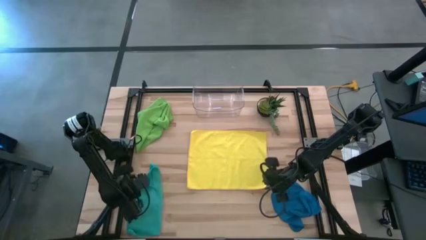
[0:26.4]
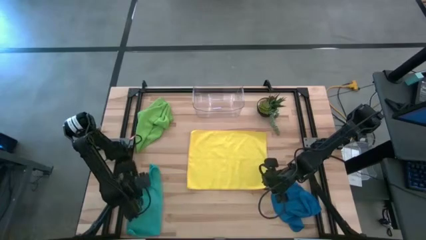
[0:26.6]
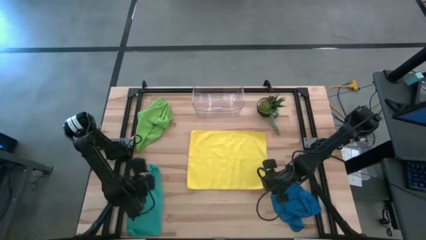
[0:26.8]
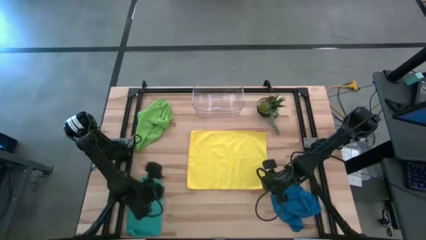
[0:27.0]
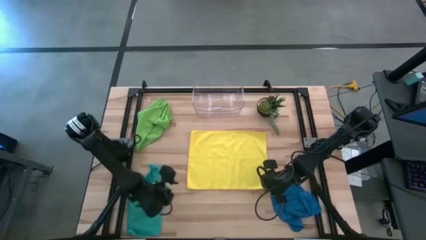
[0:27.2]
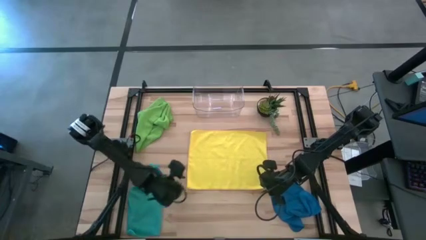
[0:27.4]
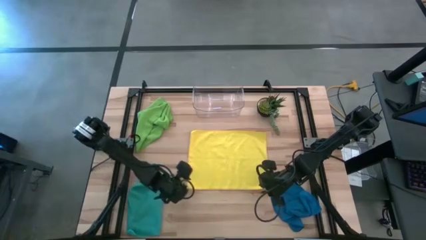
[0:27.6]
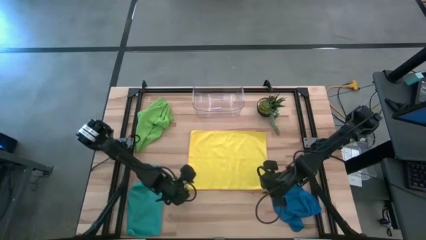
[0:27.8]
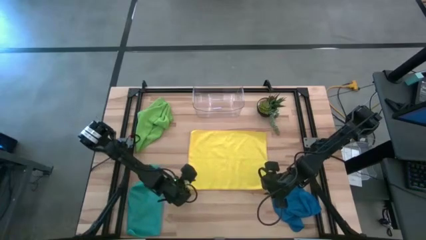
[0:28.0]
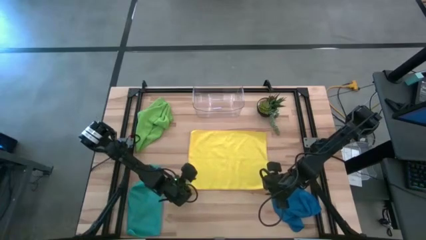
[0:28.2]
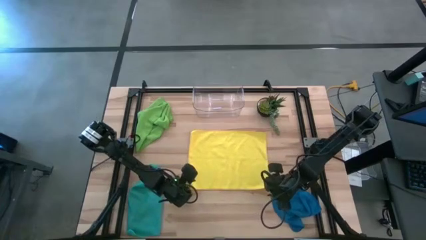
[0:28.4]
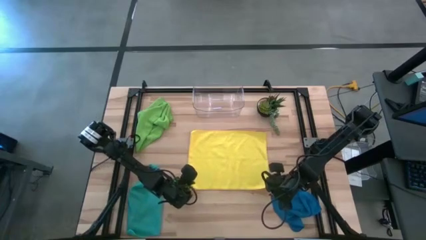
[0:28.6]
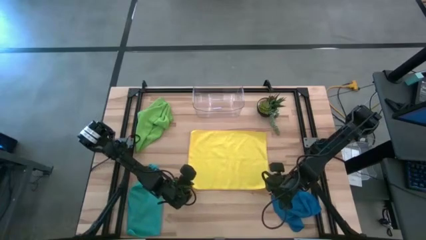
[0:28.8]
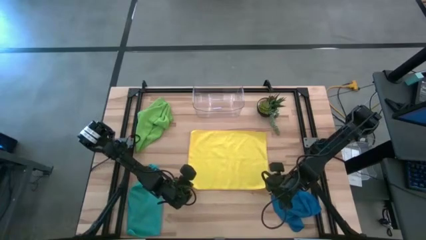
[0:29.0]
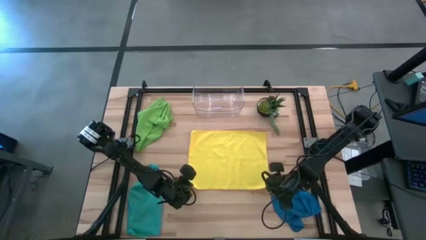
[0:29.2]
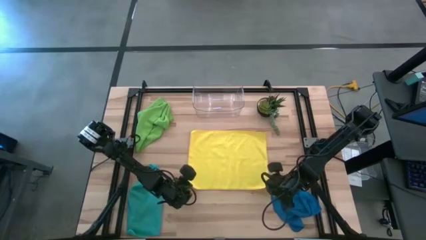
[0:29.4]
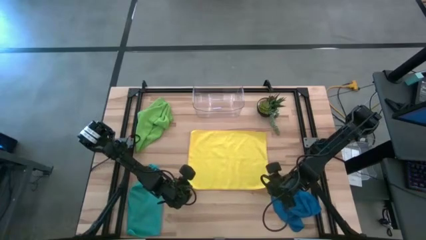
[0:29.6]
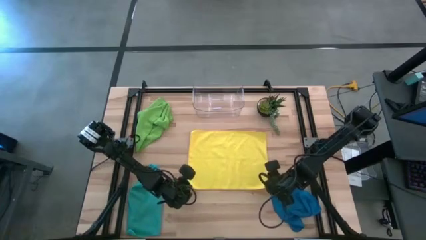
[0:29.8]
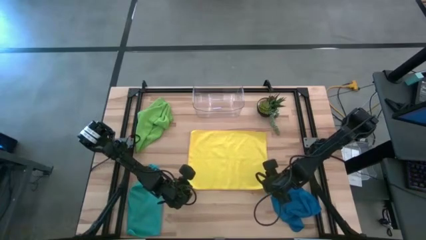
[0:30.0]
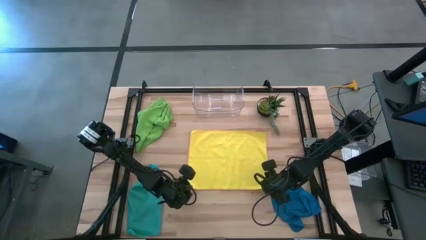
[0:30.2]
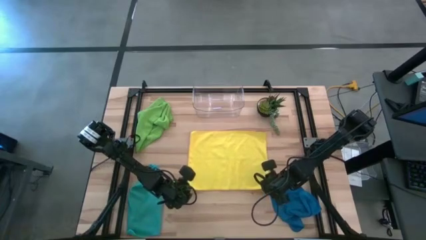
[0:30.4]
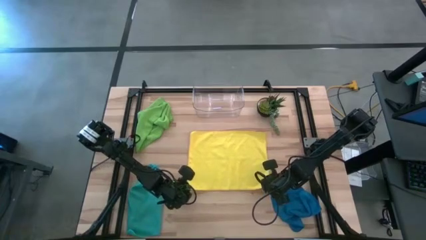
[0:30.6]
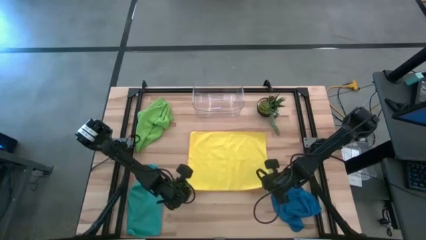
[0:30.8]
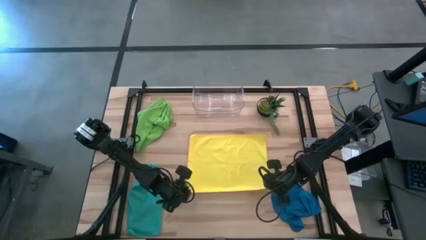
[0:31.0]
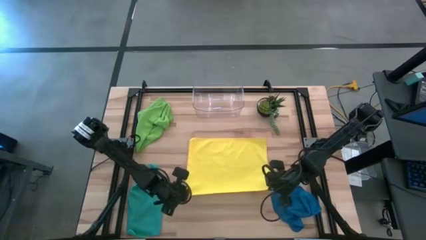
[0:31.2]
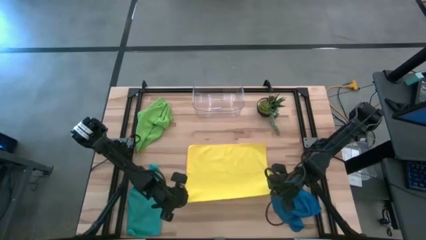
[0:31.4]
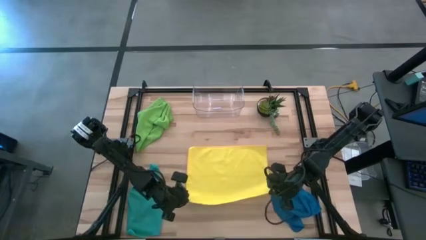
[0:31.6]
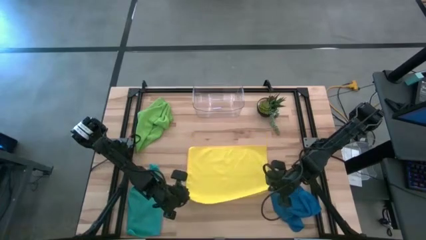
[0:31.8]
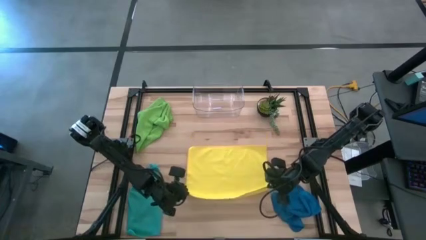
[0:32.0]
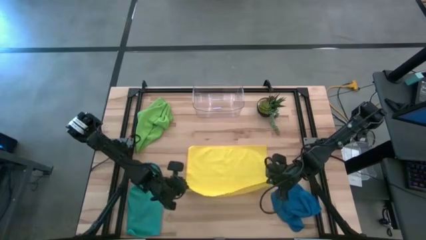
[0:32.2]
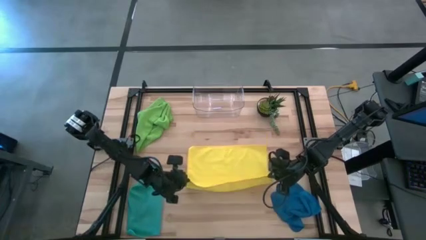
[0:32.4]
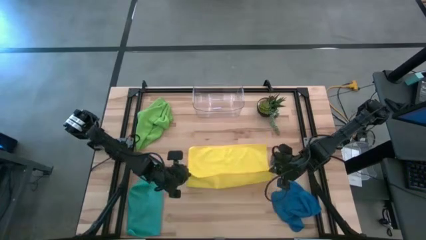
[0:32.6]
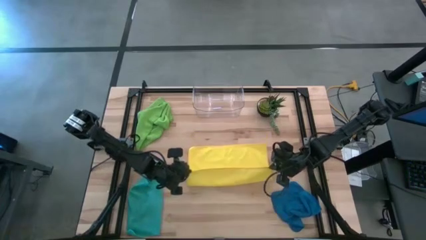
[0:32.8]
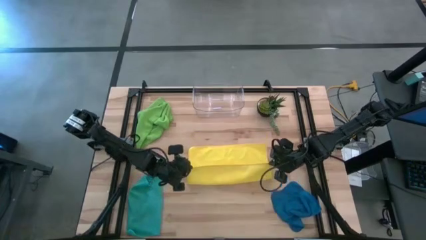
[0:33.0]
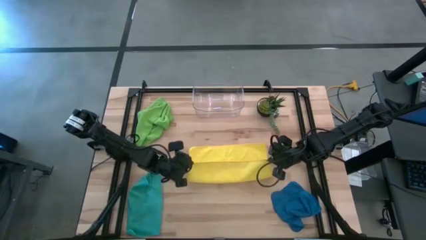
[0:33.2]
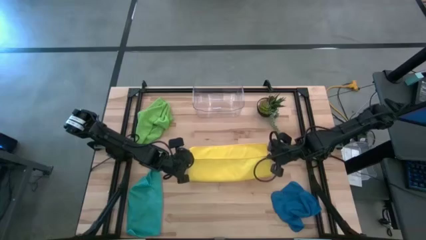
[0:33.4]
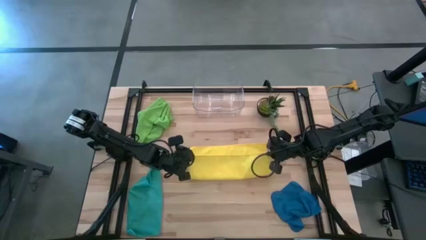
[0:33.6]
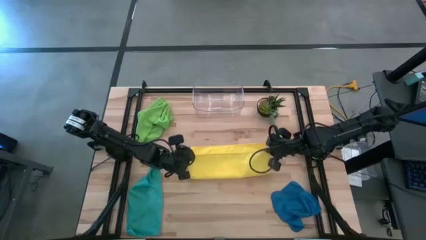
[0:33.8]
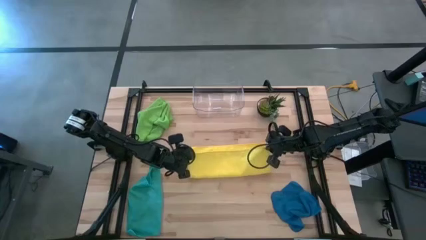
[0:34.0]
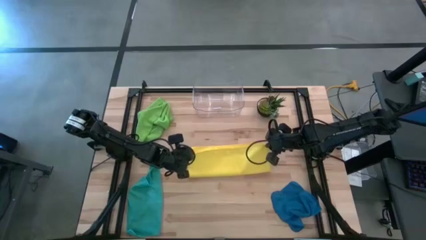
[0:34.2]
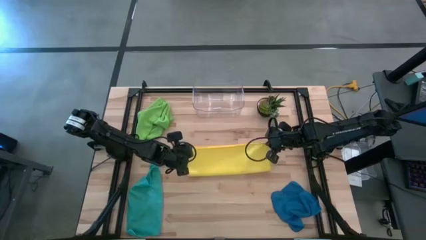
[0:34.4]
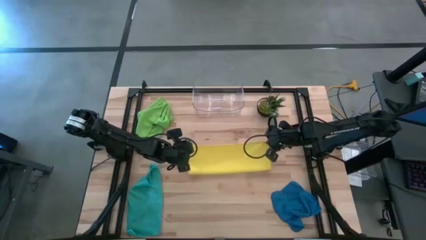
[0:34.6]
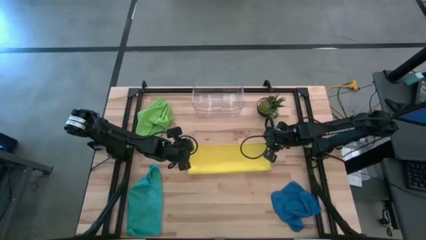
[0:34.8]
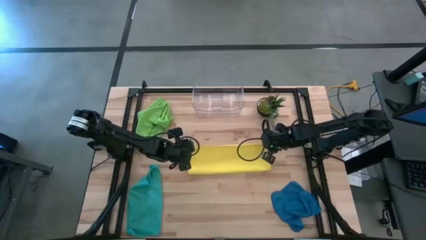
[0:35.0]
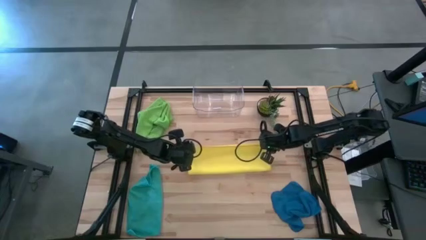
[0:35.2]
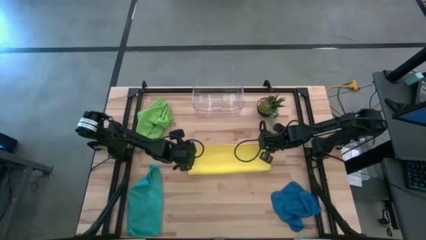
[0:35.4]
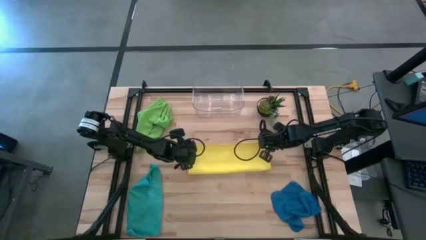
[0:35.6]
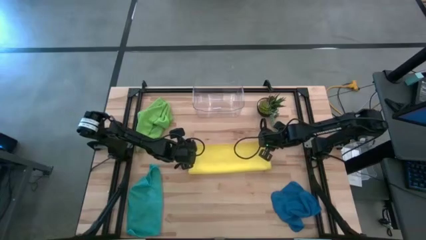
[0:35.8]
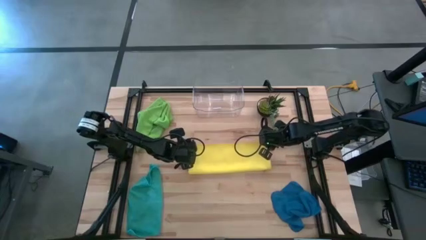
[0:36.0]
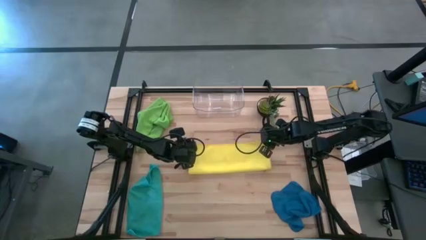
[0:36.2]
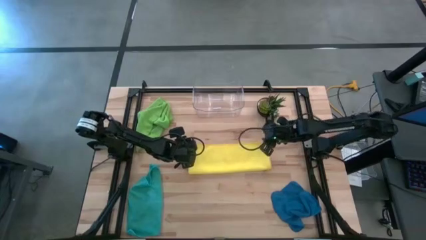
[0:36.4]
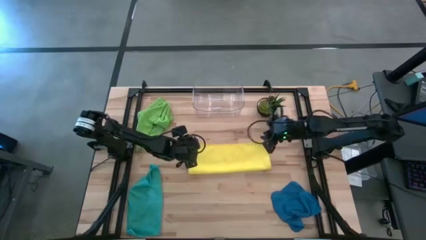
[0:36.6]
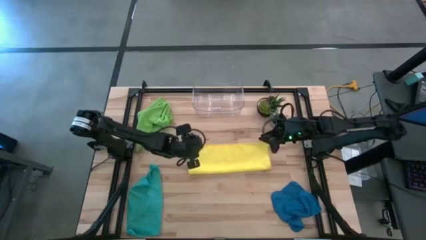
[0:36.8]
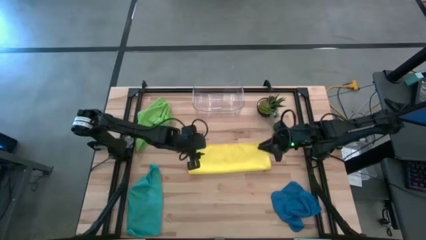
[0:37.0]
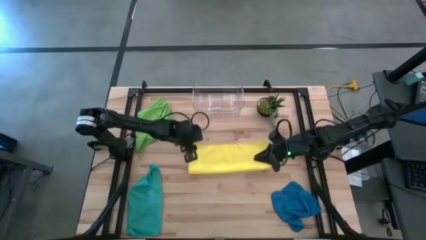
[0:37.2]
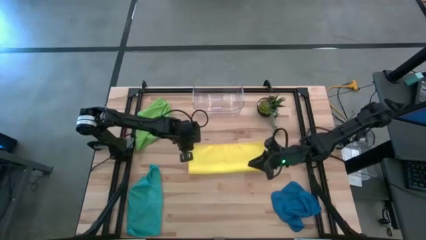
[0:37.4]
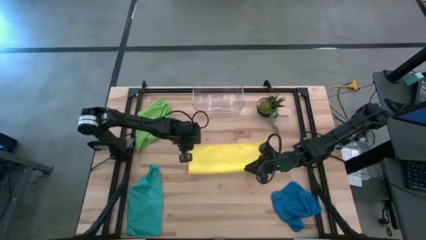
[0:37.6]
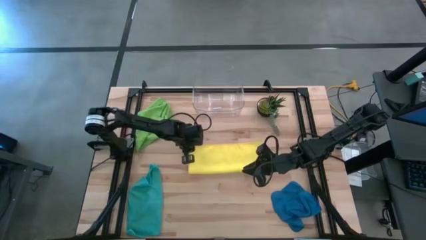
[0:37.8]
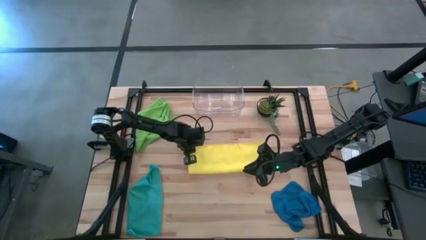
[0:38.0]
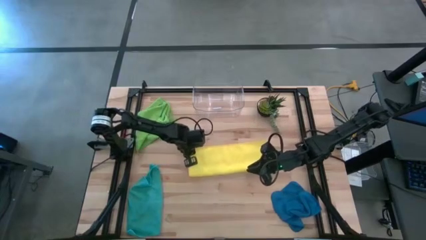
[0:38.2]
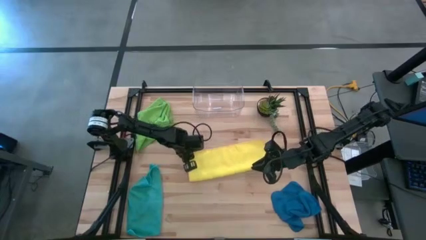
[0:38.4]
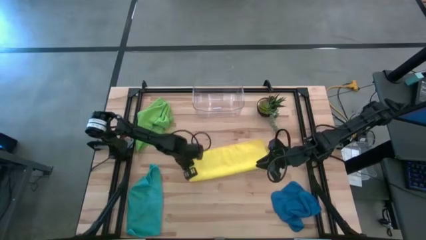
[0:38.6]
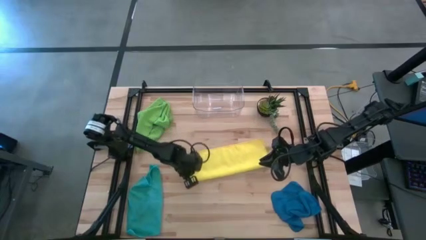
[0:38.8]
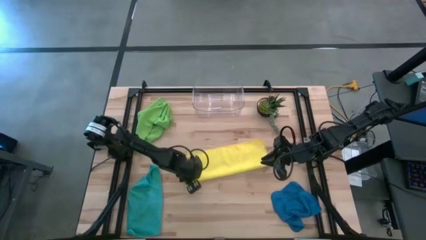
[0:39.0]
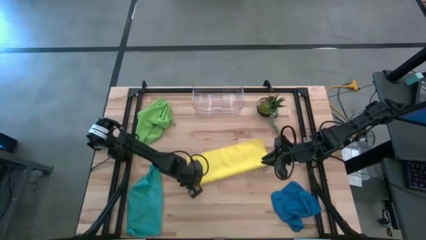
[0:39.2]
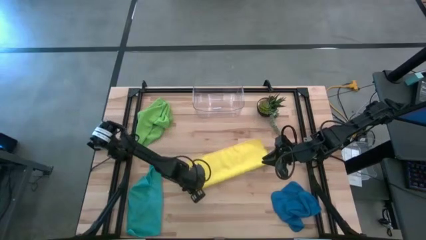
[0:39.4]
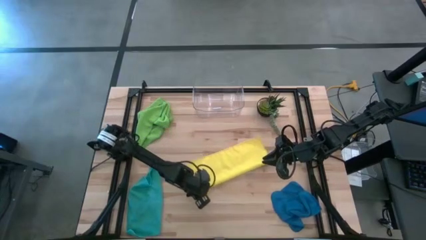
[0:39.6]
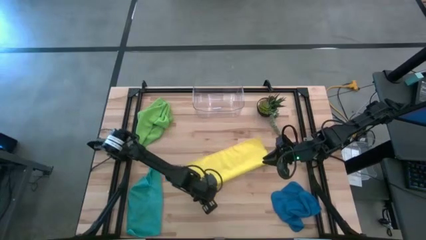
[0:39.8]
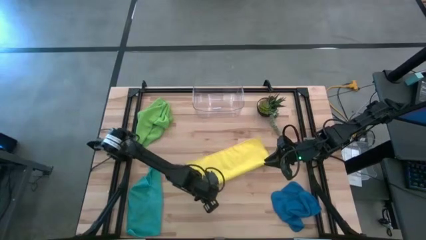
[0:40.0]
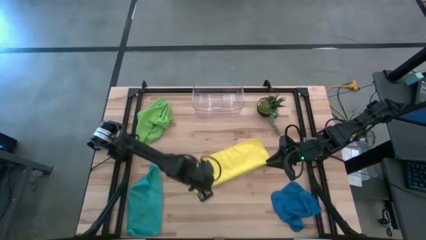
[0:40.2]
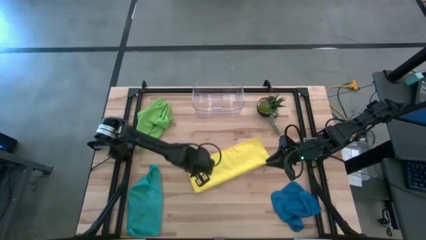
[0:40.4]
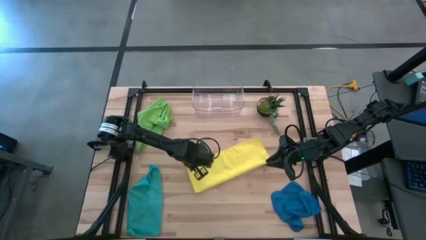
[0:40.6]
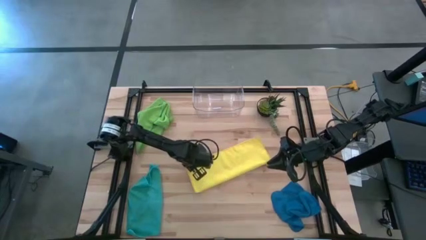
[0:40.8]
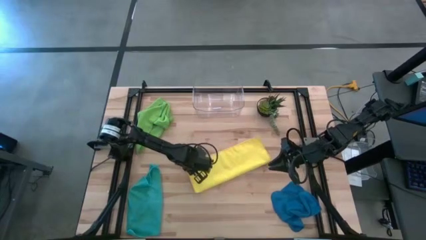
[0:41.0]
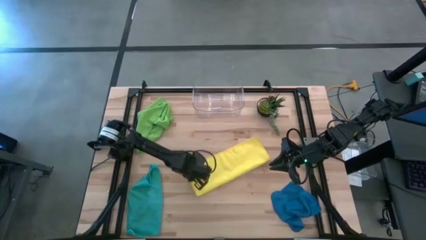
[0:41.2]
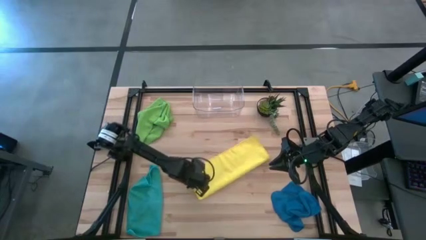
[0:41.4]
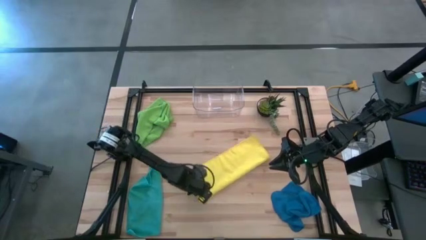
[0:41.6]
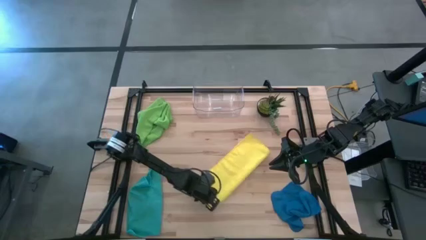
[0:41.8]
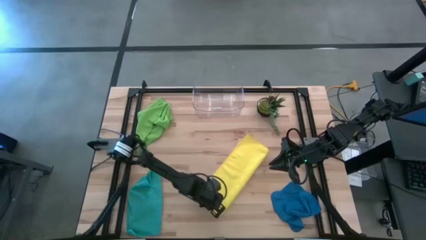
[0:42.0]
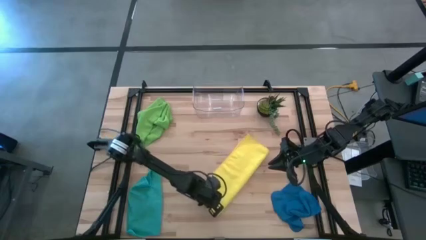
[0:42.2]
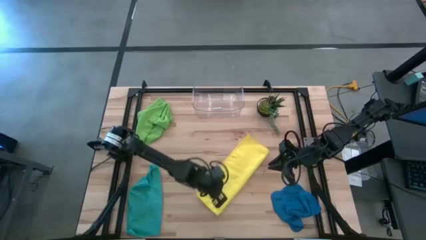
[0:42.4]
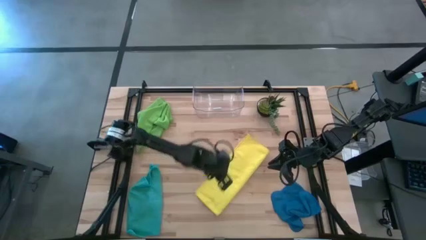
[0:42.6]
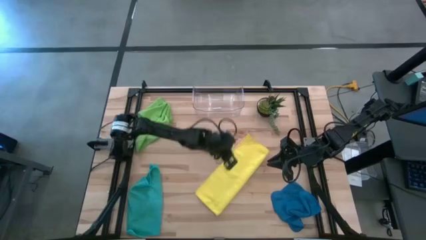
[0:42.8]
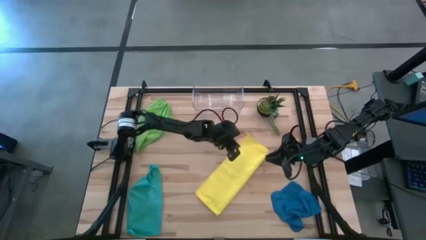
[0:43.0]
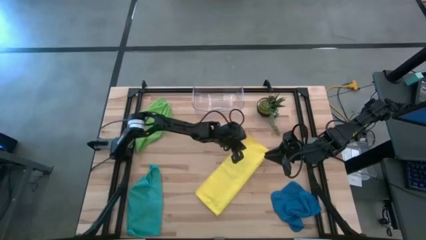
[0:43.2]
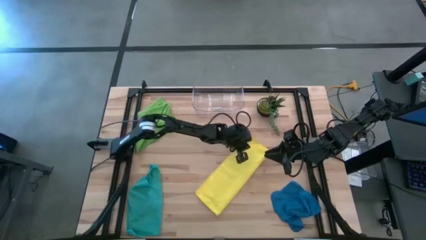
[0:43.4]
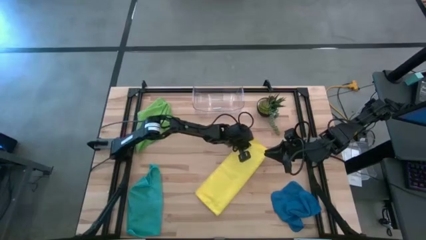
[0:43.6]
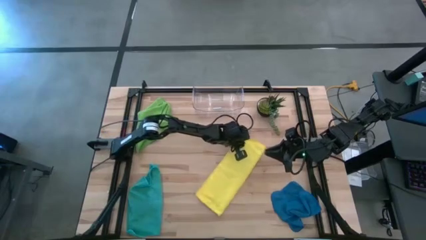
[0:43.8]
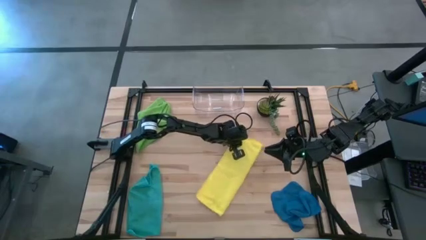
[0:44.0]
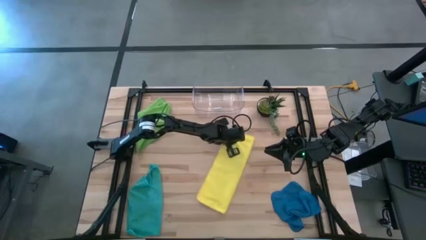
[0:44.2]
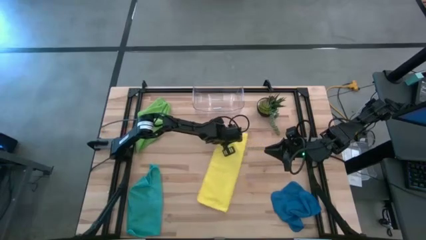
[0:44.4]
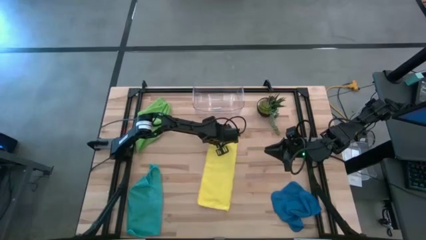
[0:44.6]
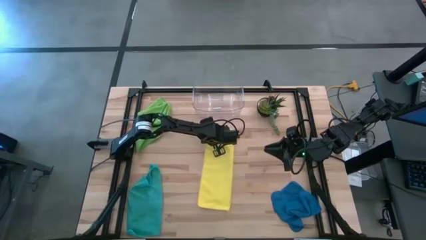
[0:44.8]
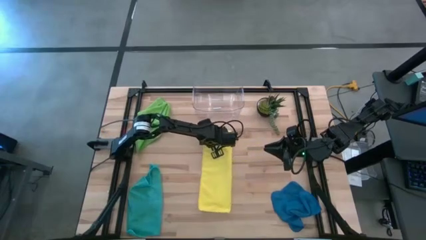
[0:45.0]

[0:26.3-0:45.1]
Task: Fold microfiber towels
Fold the yellow microfiber towel
